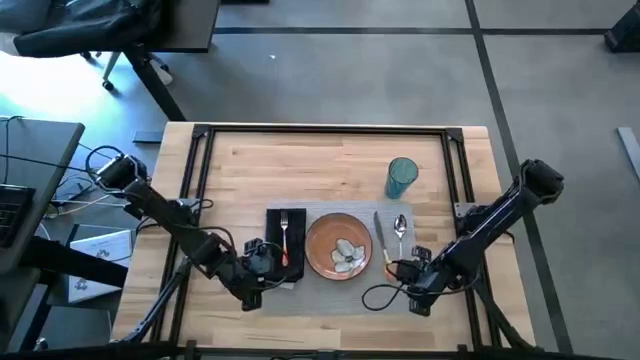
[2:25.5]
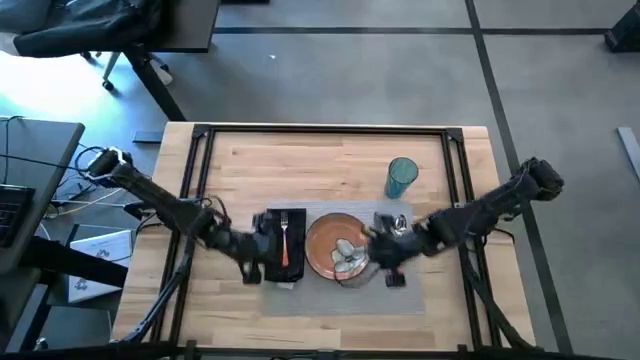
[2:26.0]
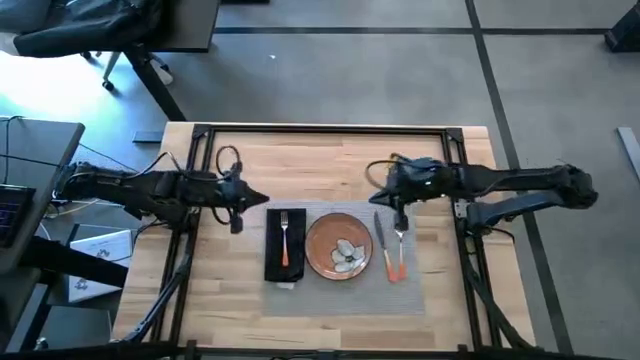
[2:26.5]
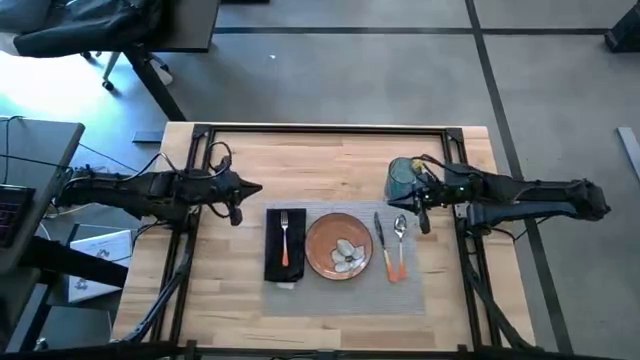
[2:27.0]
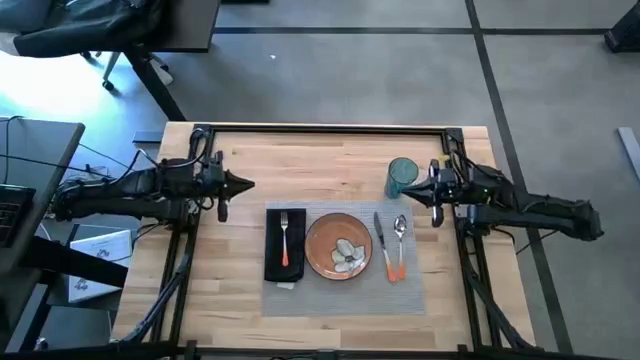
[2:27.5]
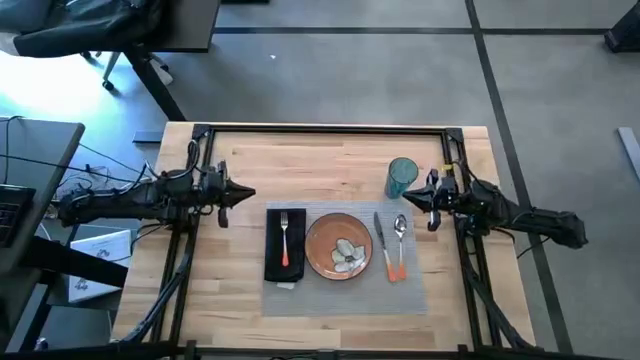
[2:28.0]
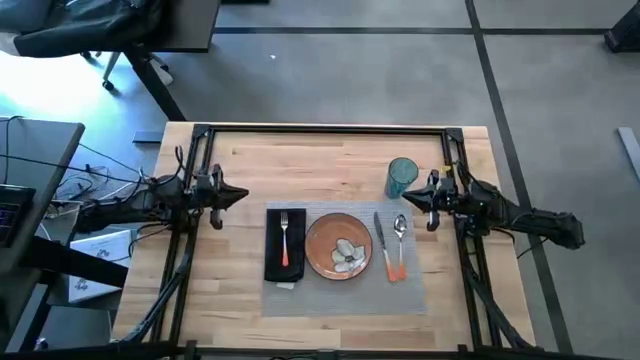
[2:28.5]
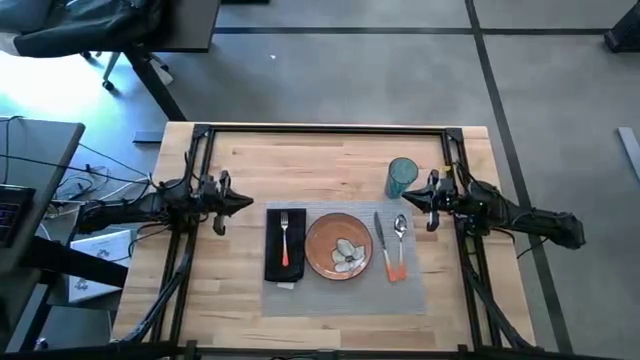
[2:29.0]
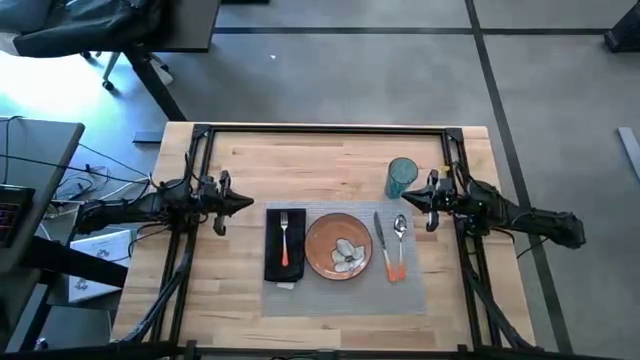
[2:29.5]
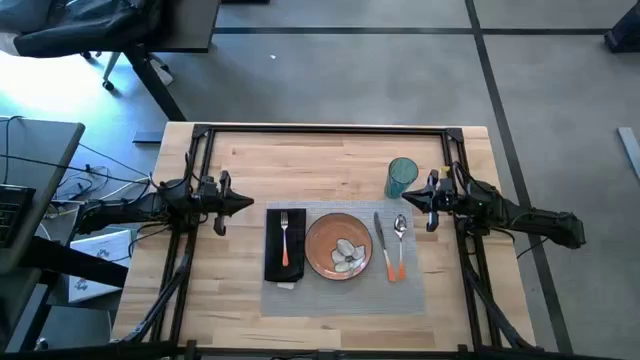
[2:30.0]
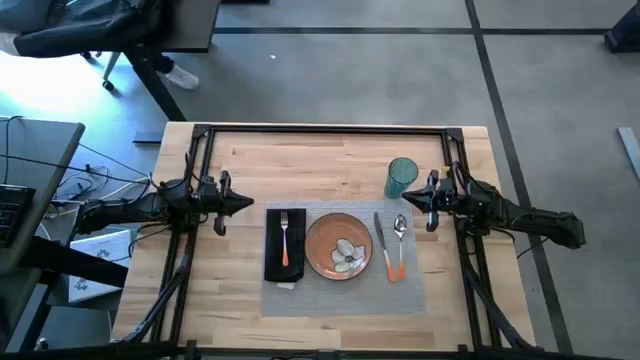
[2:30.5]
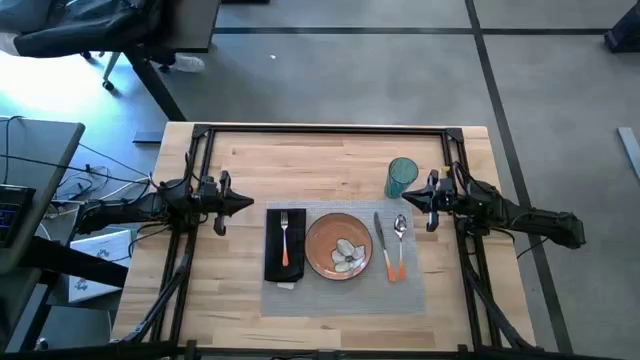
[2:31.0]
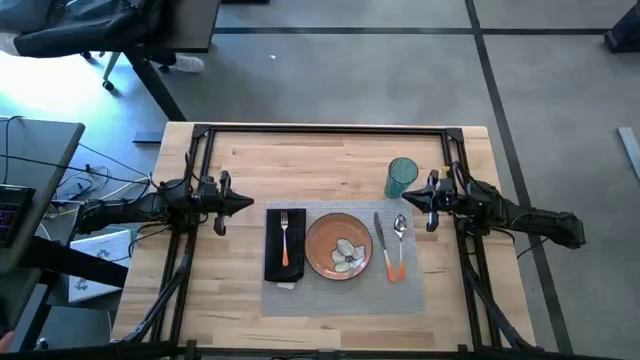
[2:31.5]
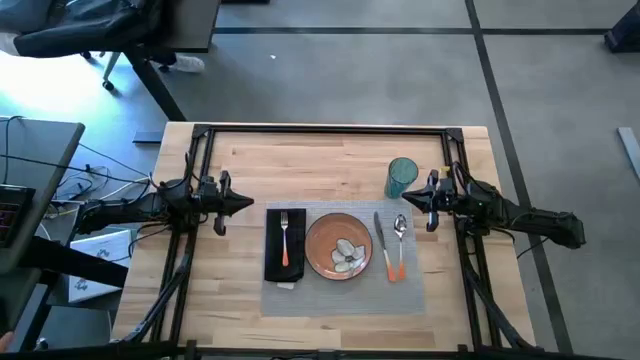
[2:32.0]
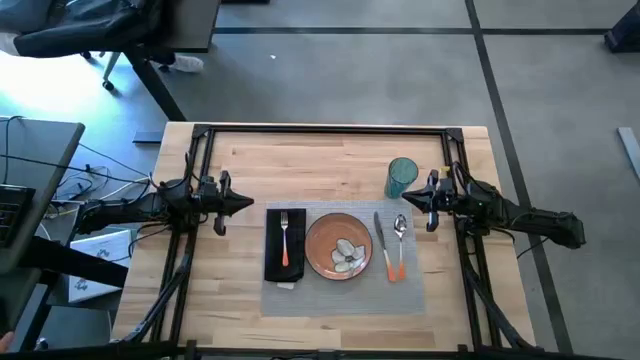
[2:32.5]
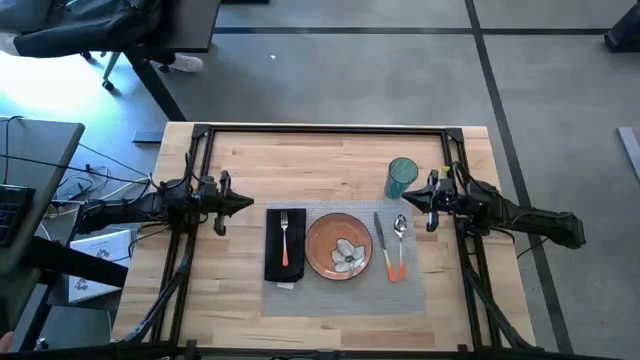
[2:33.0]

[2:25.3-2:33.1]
Task: Set table place
Return to Home Position

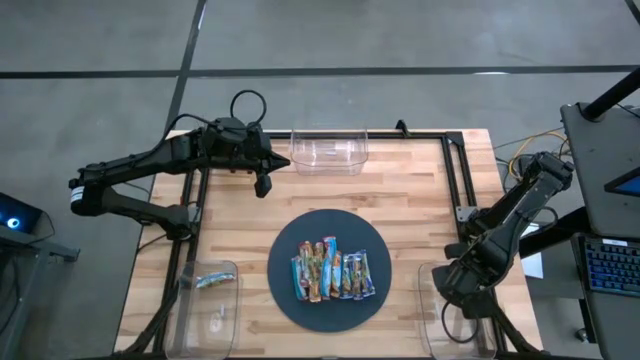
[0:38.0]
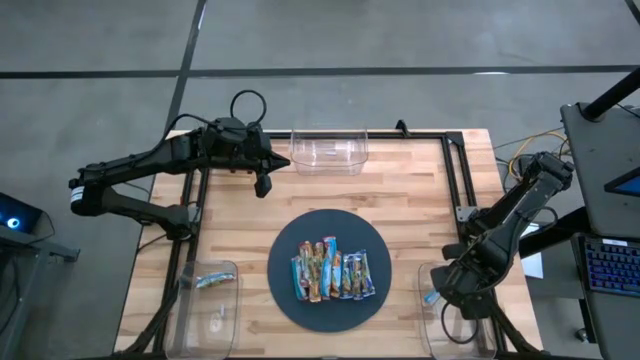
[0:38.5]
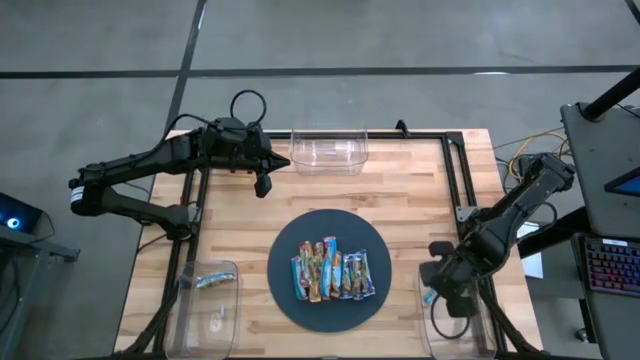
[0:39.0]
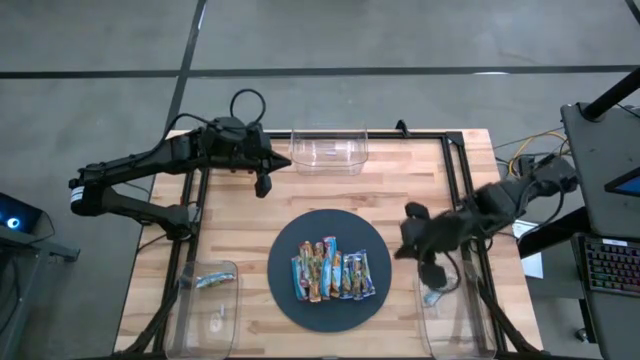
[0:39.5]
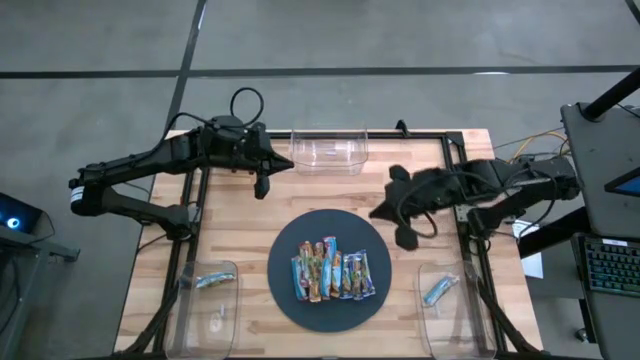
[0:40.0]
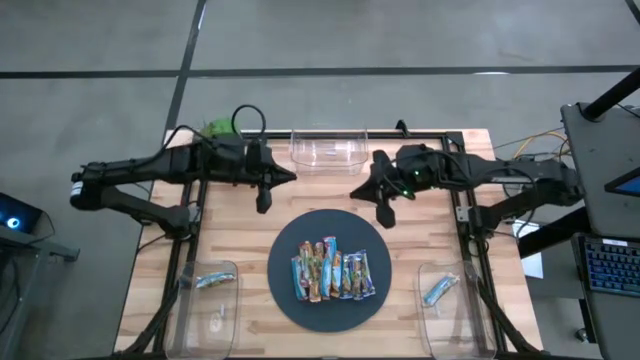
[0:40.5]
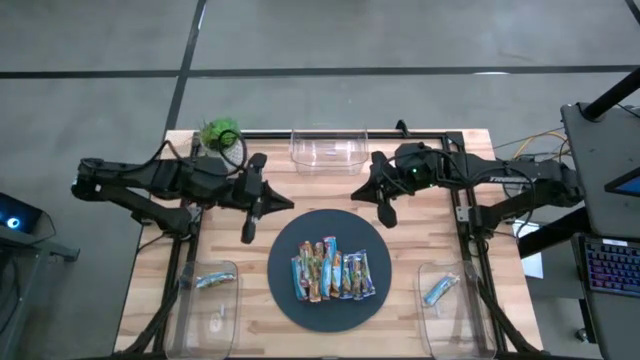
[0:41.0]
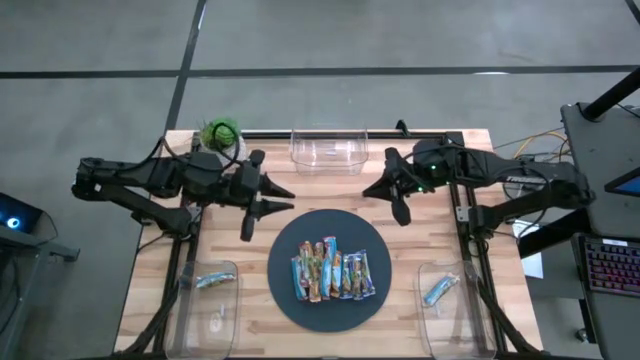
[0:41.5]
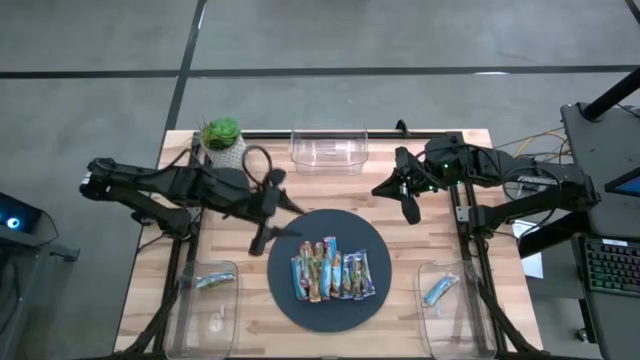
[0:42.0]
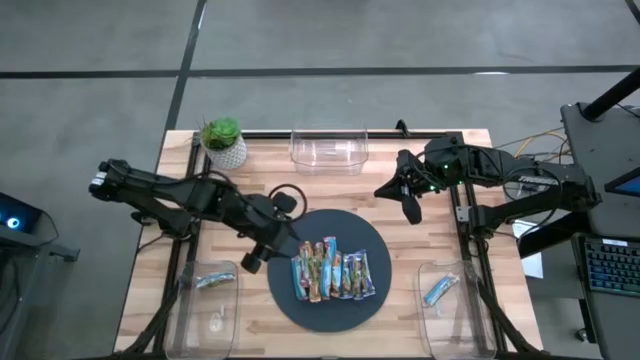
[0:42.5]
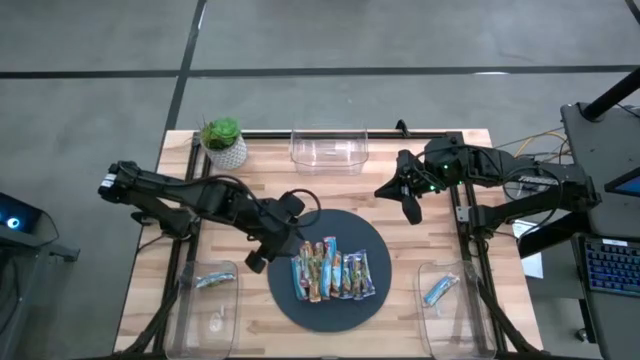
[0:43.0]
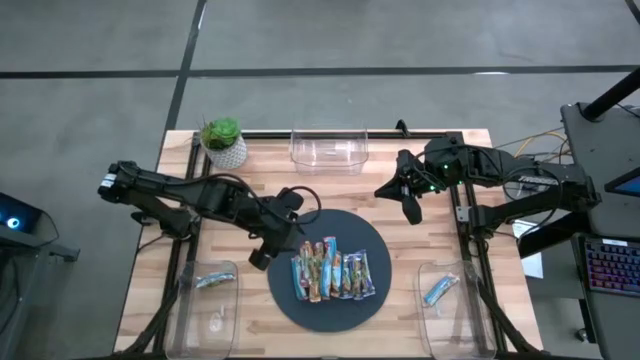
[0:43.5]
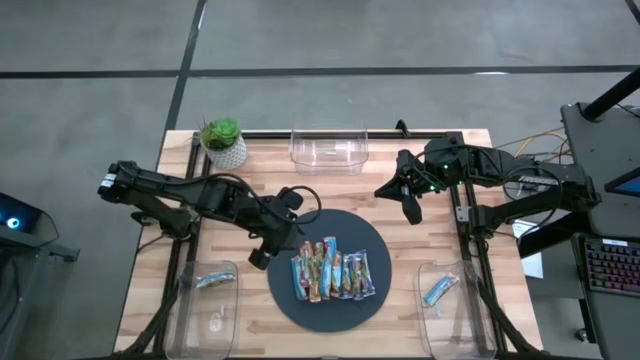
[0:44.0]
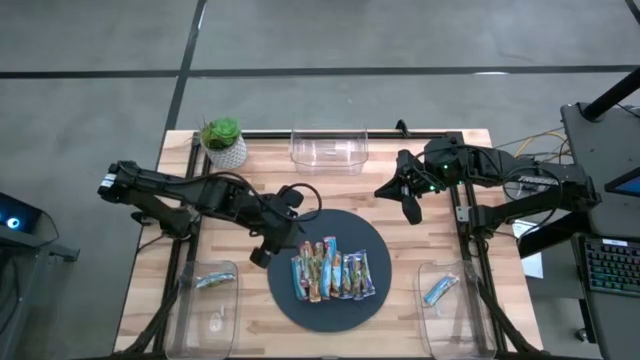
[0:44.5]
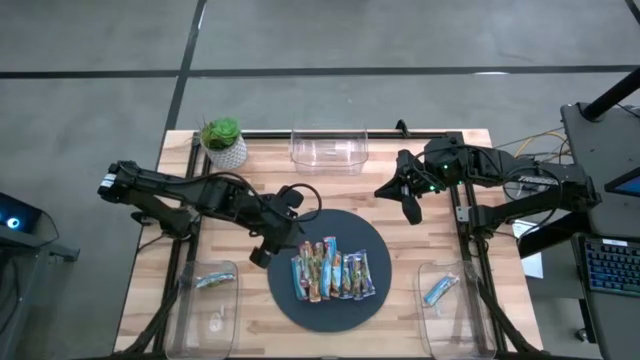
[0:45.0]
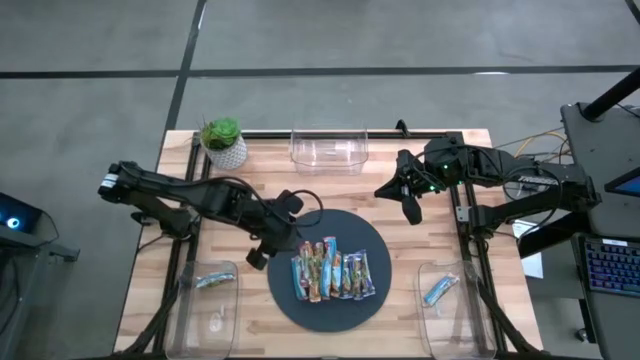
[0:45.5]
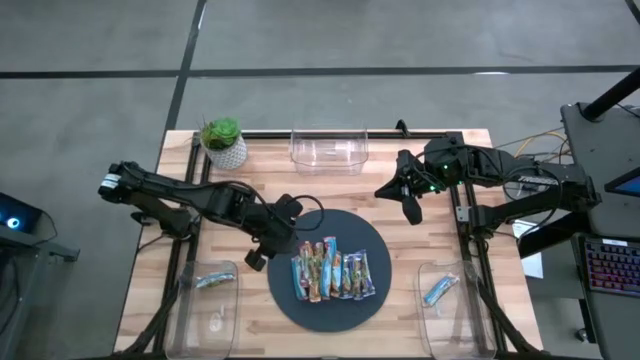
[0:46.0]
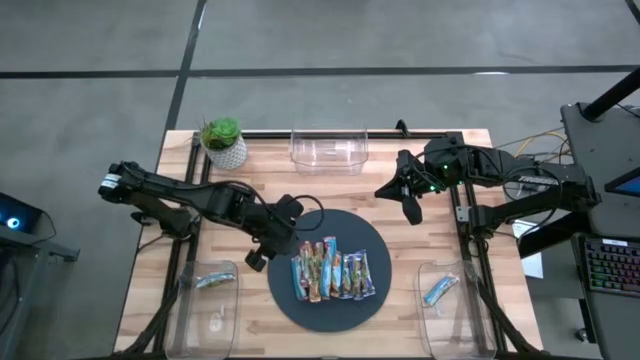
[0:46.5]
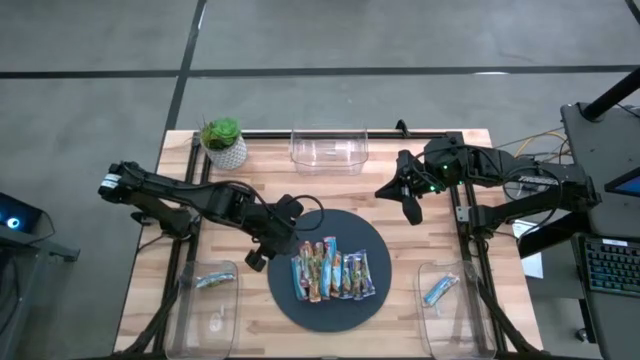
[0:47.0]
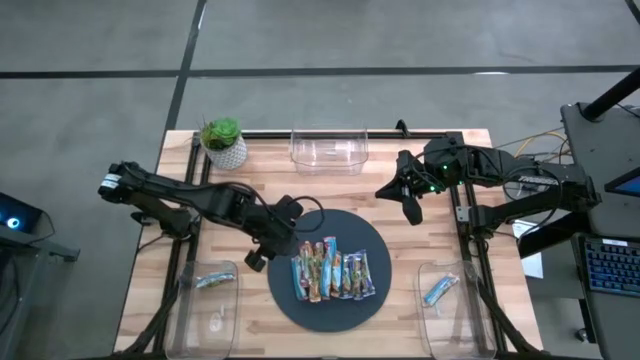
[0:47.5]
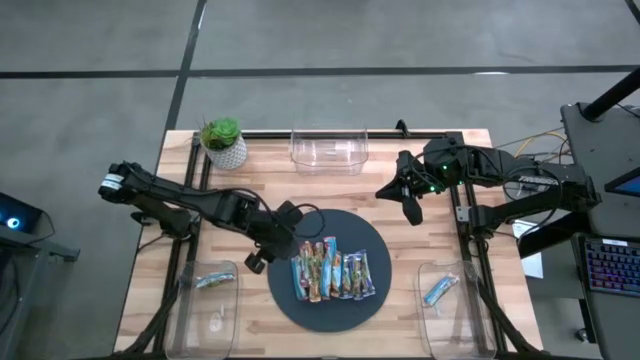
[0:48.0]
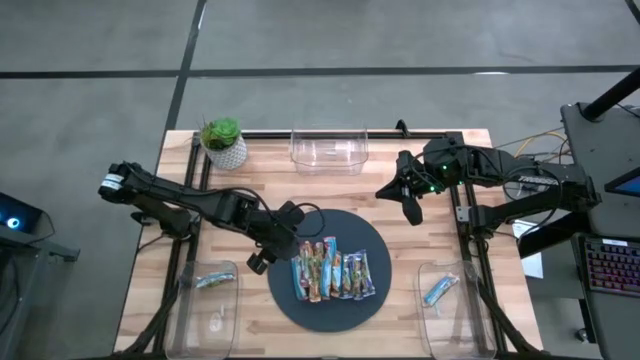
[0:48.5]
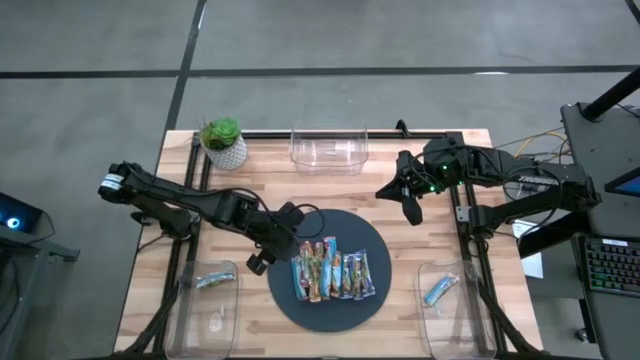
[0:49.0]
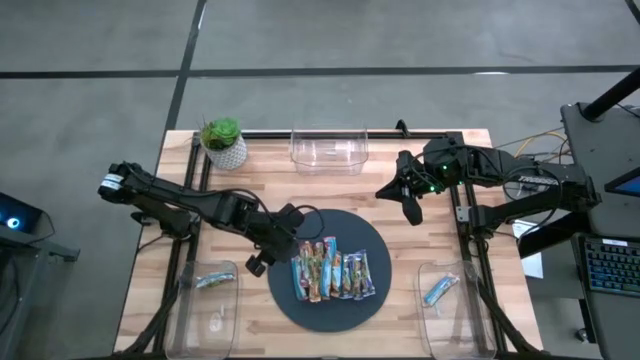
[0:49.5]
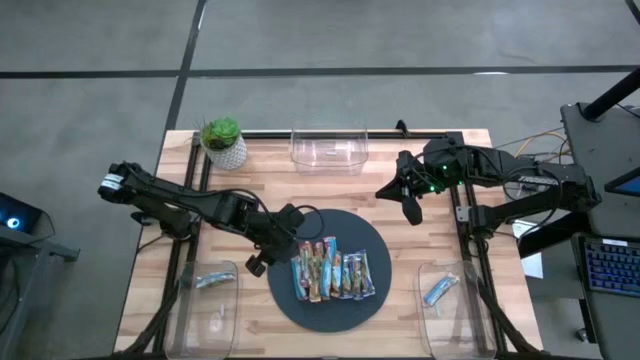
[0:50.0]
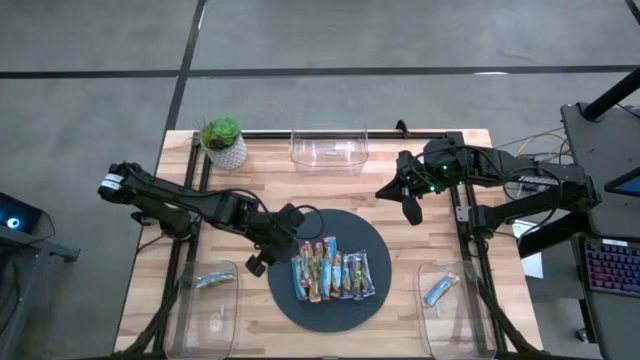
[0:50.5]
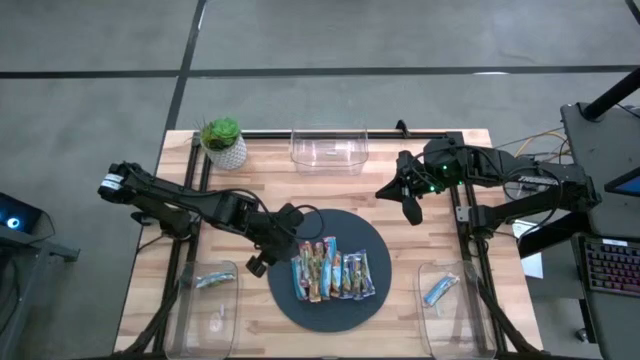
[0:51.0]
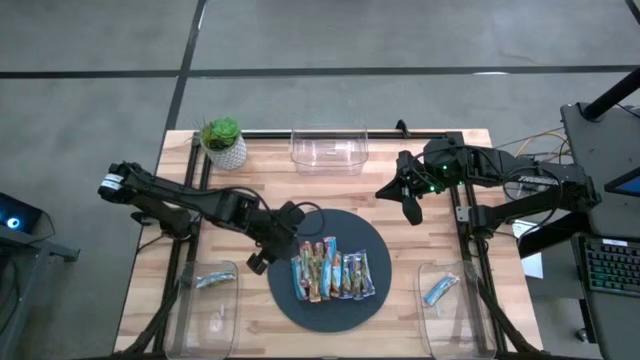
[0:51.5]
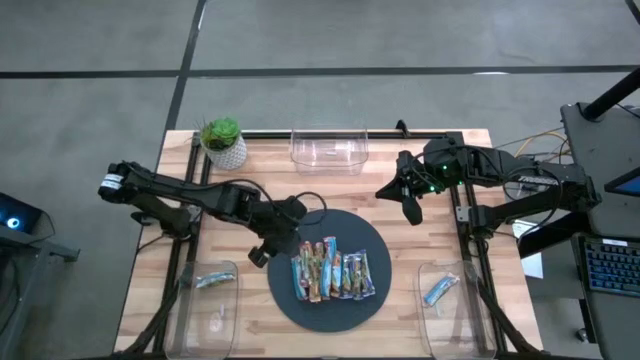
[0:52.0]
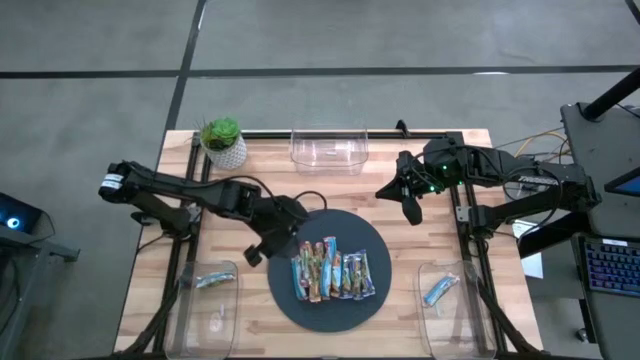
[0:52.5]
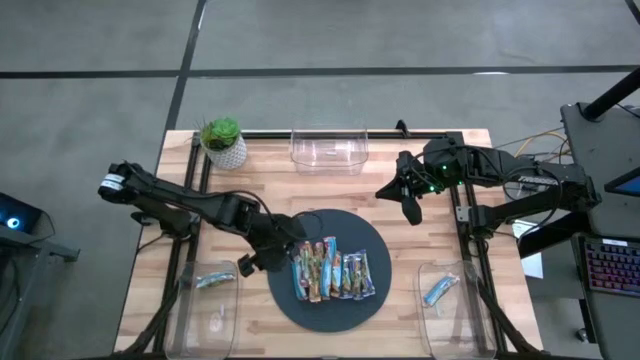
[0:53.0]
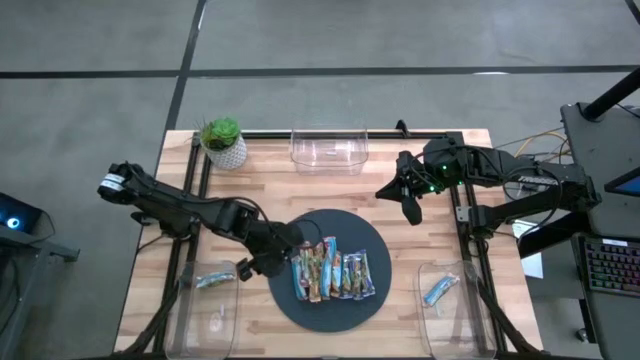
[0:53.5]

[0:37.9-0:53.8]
Task: Pick and place Granola Bars by type
Put the red granola bar into the bottom left transparent bin
